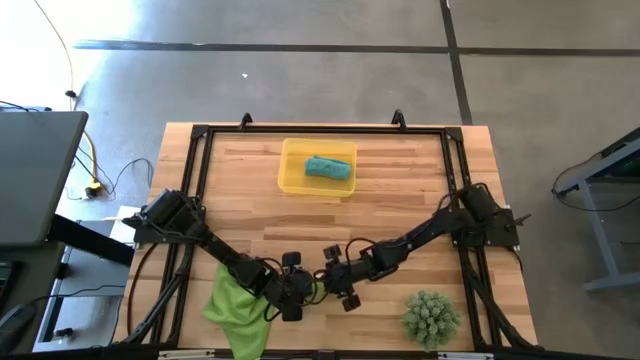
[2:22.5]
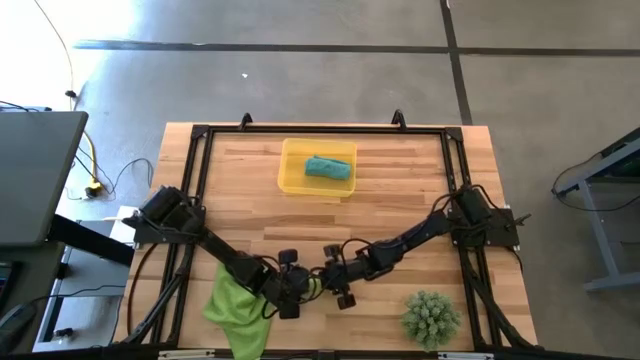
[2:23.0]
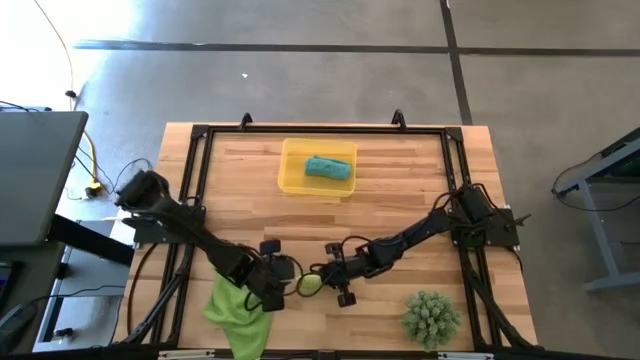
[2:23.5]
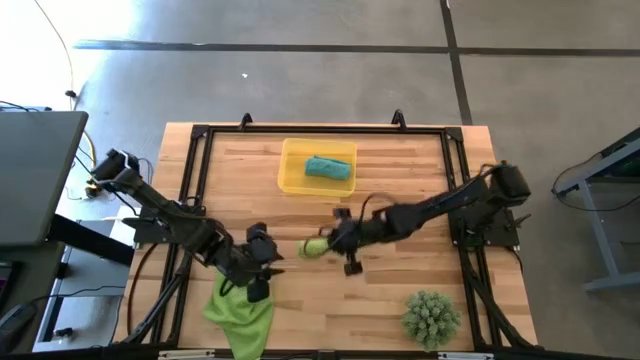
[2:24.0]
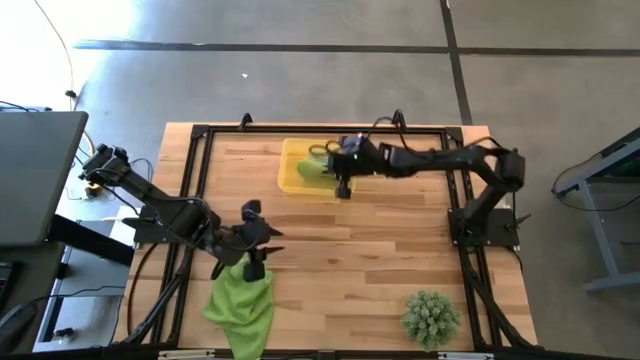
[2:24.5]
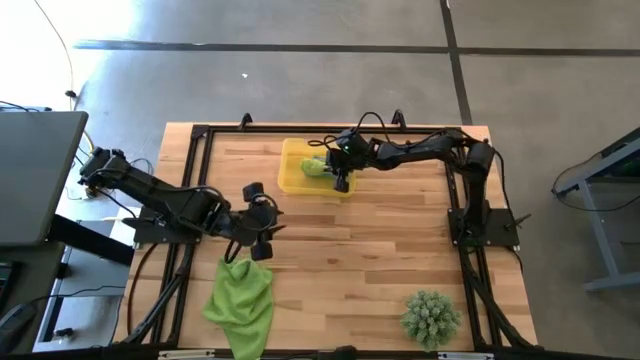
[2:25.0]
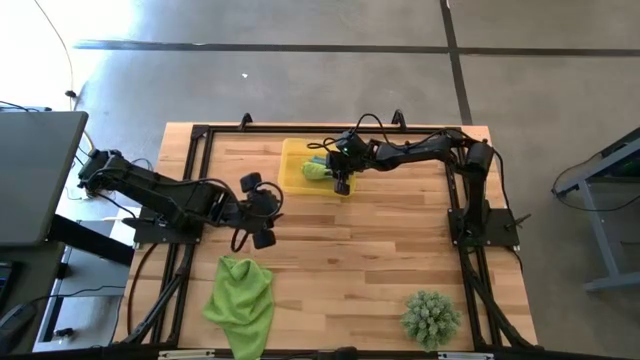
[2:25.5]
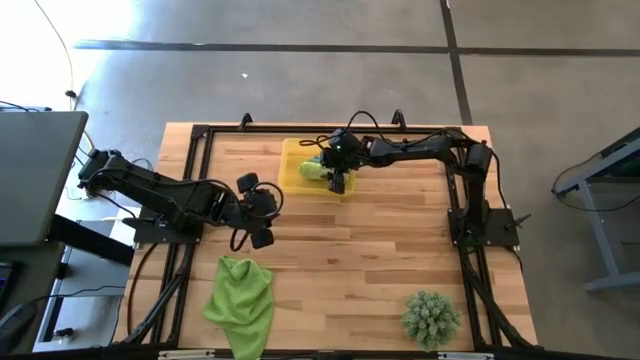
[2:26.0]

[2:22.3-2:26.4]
Task: Roll microfiber towels into tight, uniform cylinder then place into a basket
Put the rolled light green microfiber towel into the bin

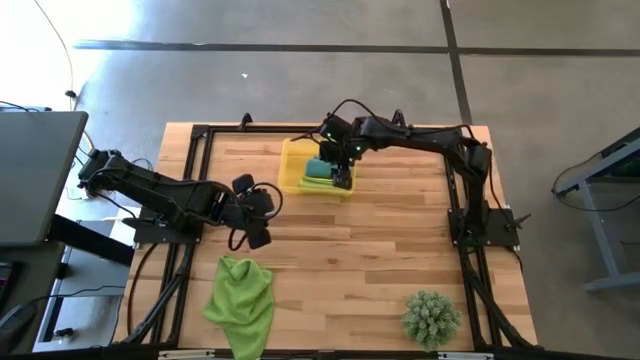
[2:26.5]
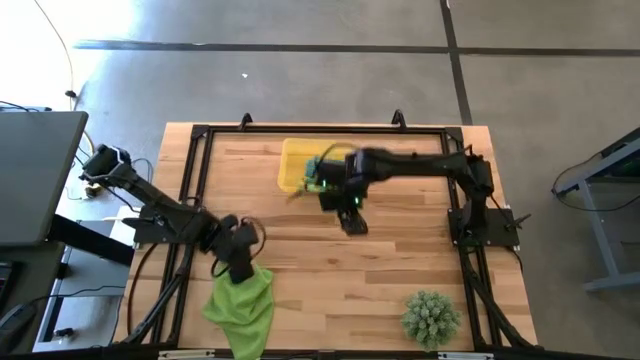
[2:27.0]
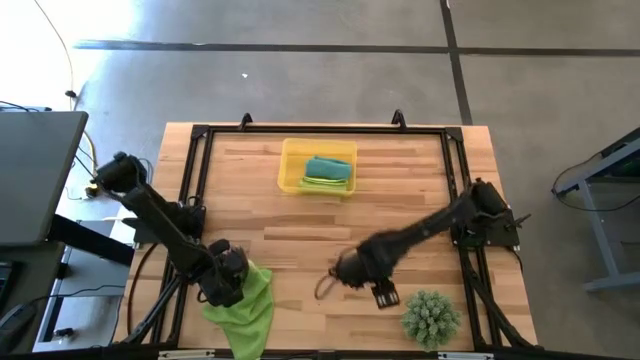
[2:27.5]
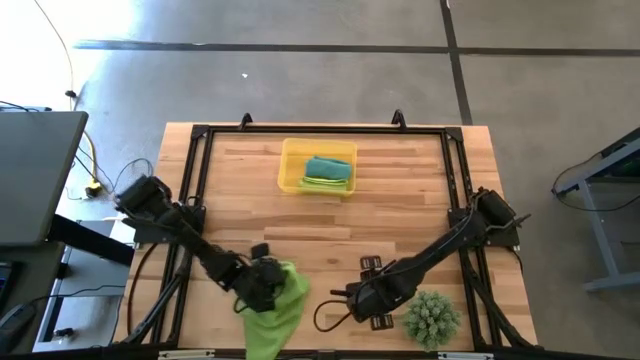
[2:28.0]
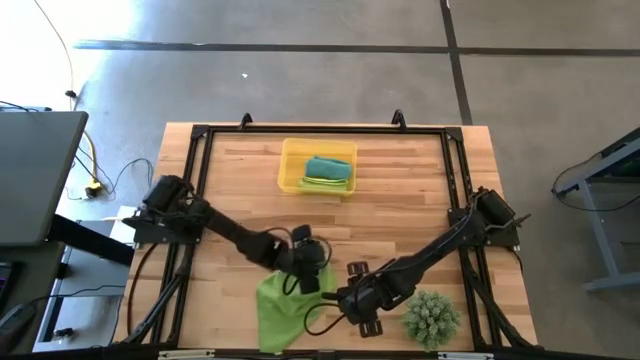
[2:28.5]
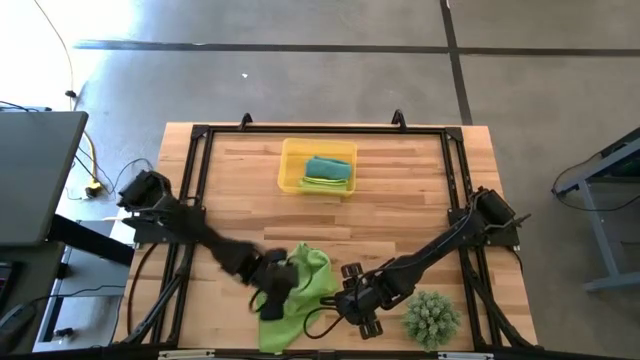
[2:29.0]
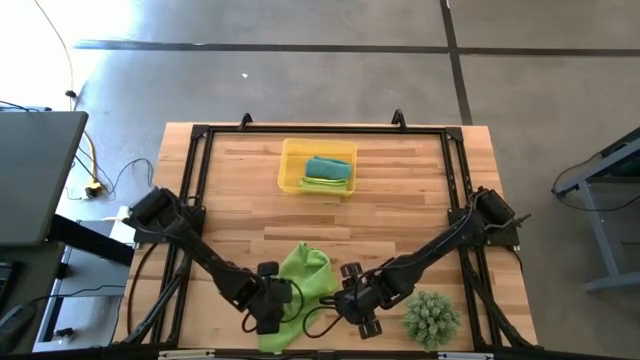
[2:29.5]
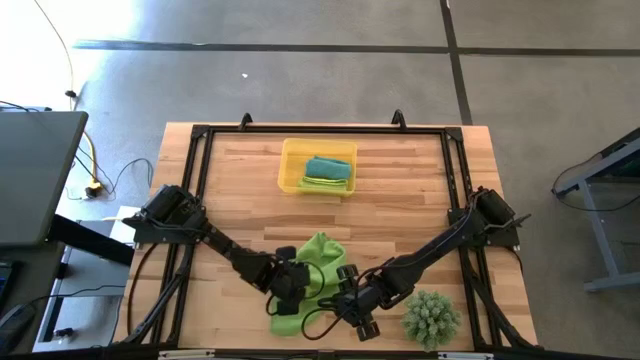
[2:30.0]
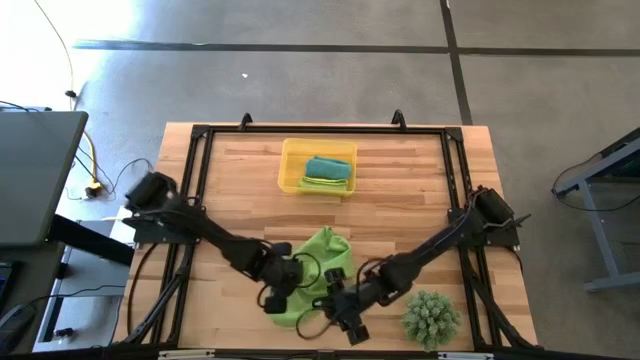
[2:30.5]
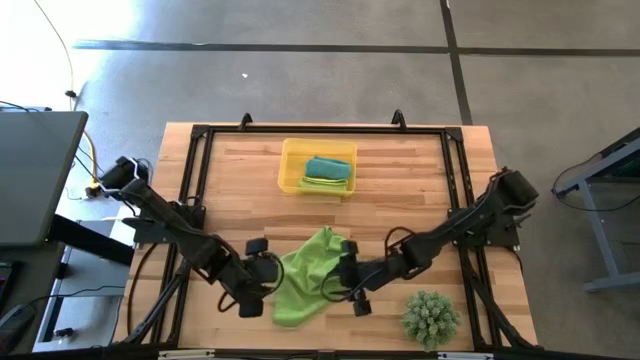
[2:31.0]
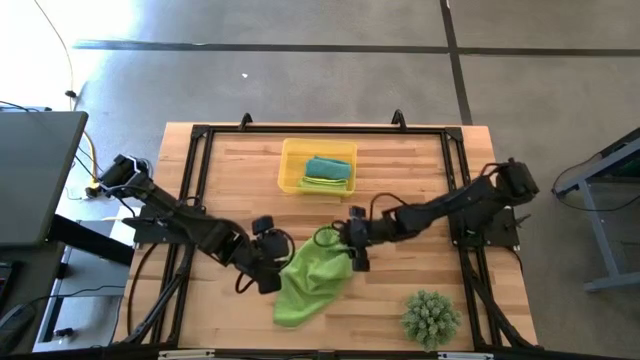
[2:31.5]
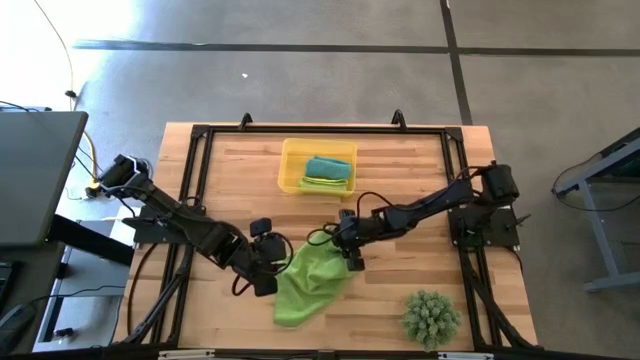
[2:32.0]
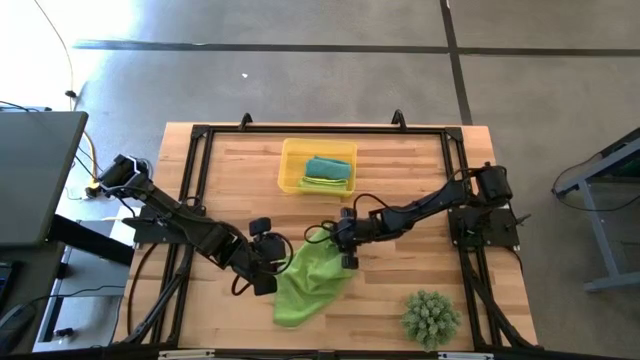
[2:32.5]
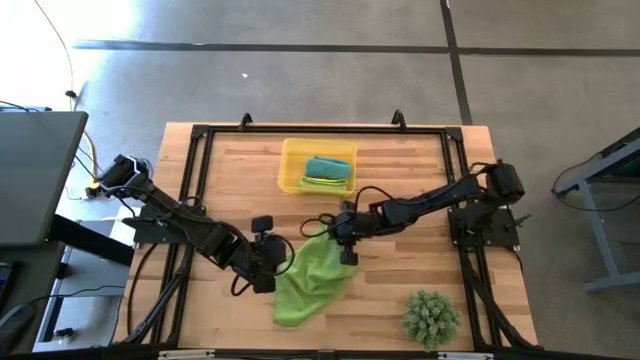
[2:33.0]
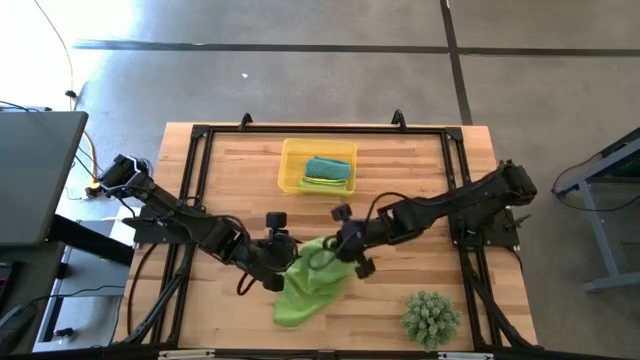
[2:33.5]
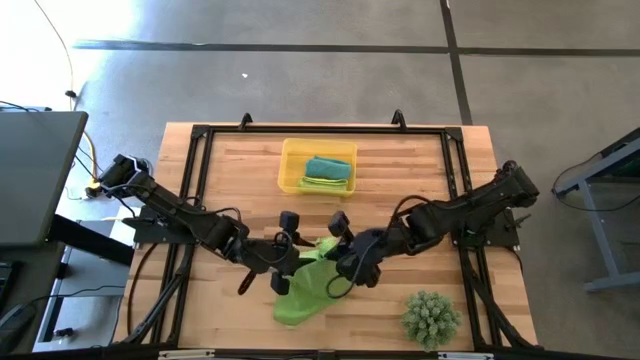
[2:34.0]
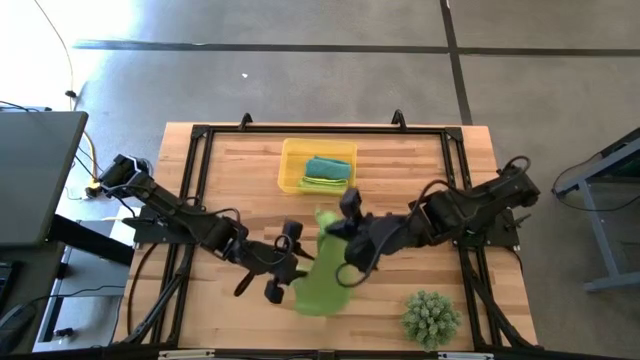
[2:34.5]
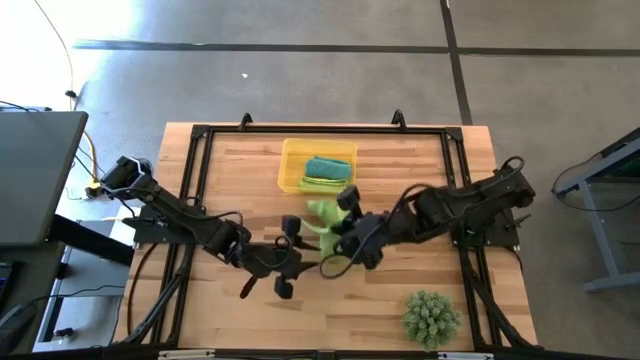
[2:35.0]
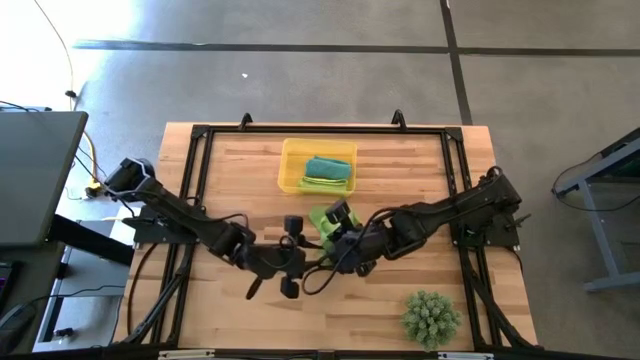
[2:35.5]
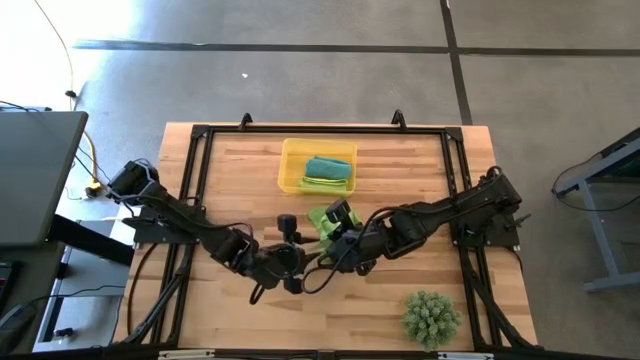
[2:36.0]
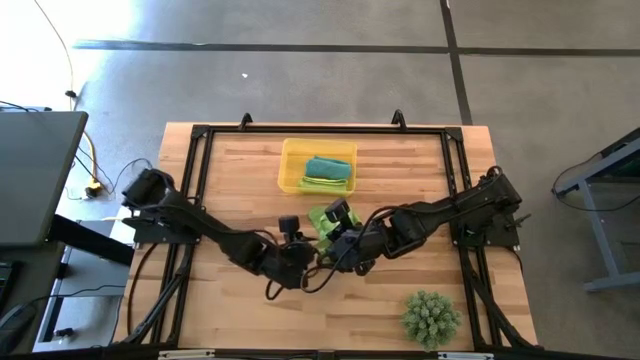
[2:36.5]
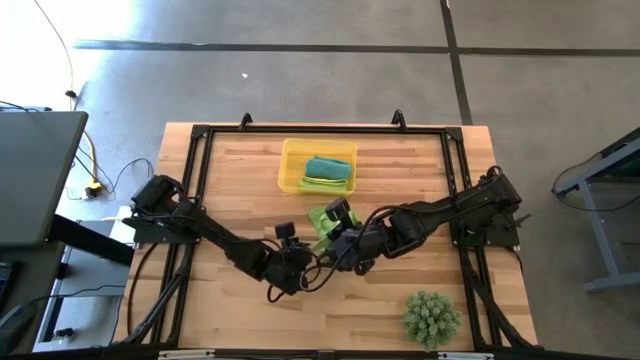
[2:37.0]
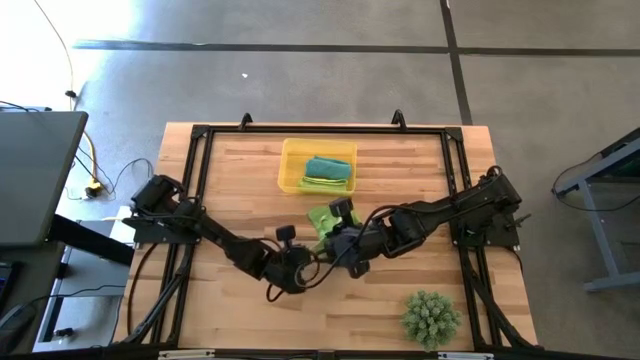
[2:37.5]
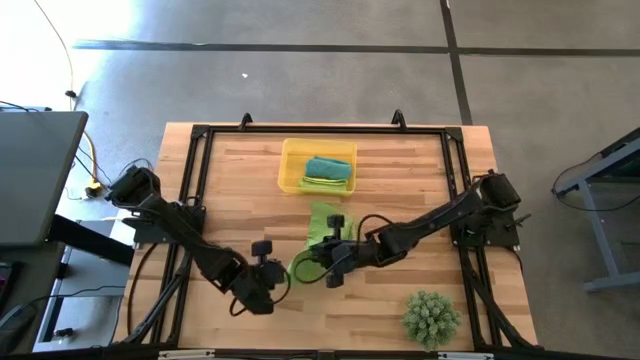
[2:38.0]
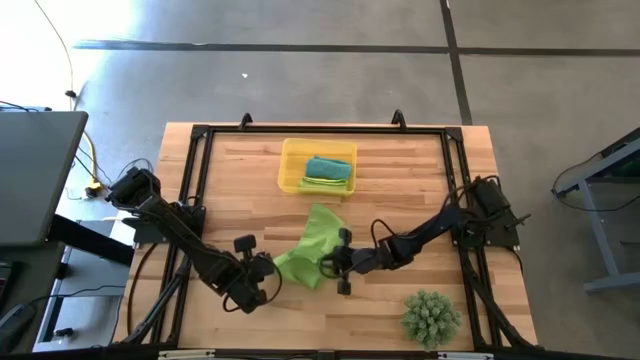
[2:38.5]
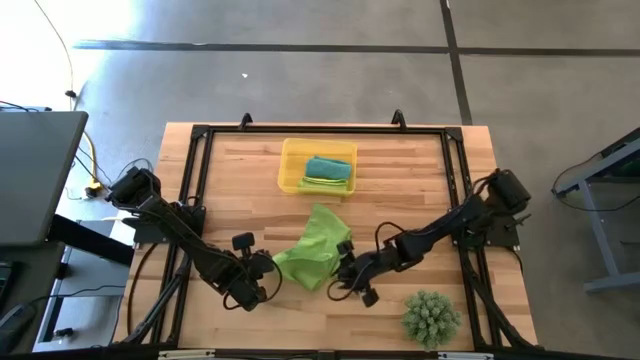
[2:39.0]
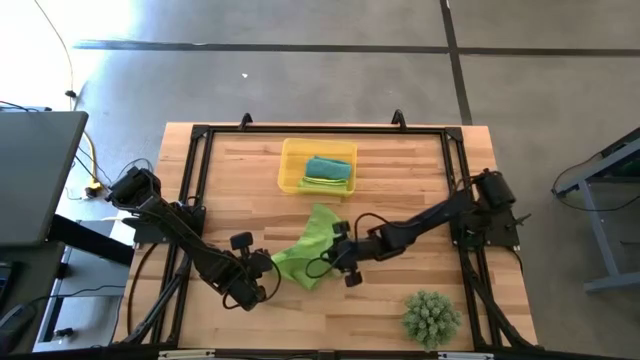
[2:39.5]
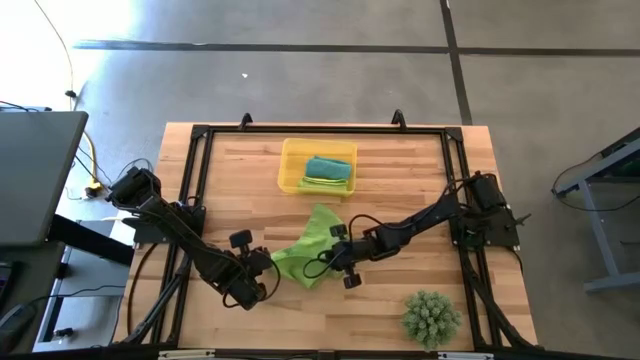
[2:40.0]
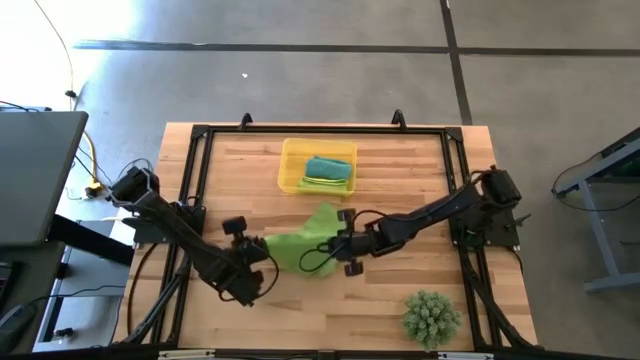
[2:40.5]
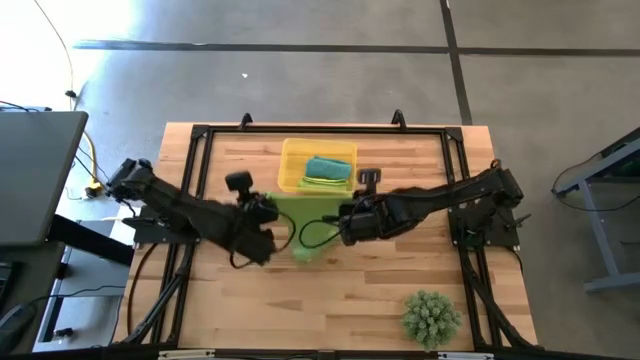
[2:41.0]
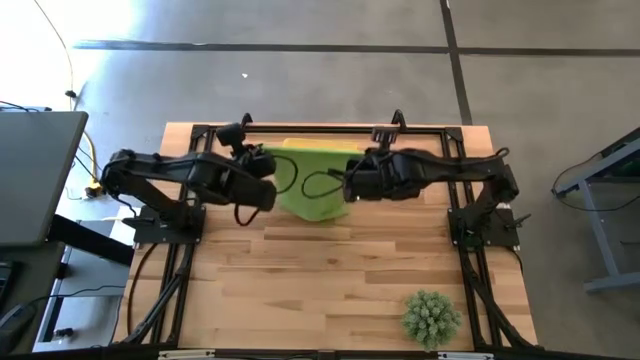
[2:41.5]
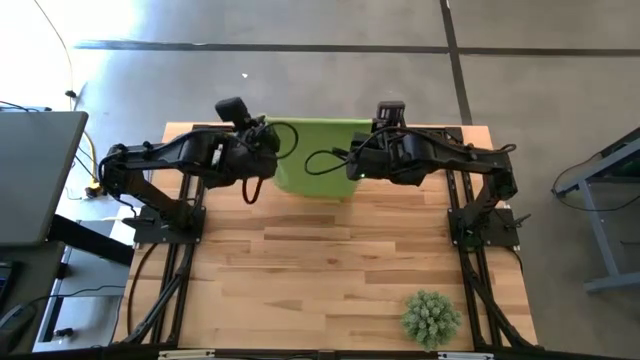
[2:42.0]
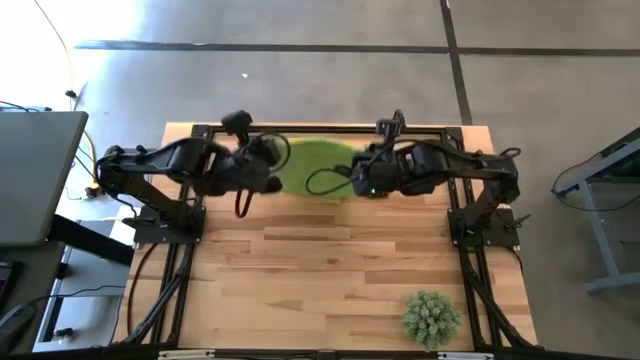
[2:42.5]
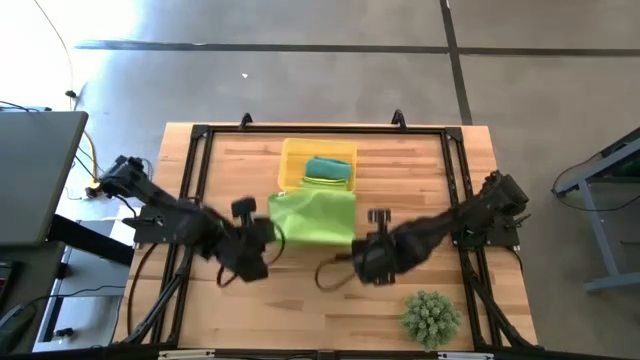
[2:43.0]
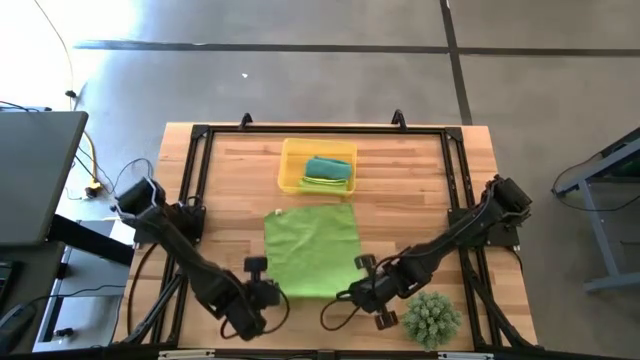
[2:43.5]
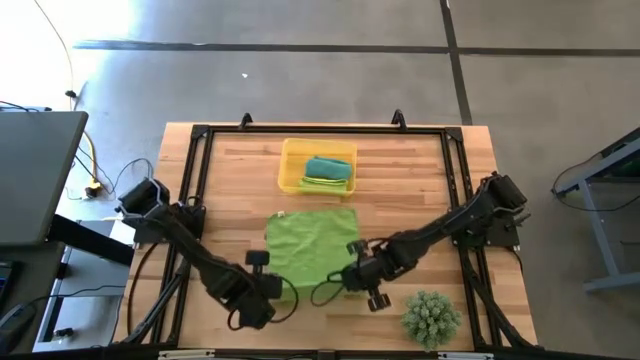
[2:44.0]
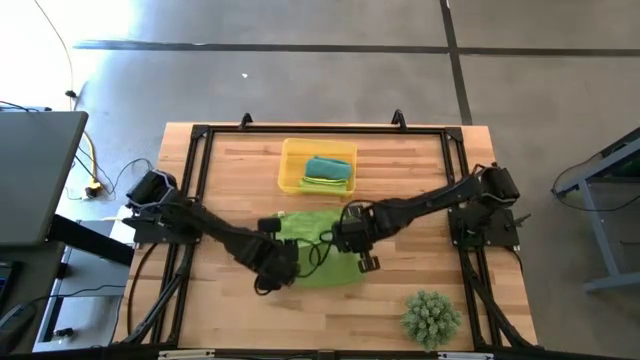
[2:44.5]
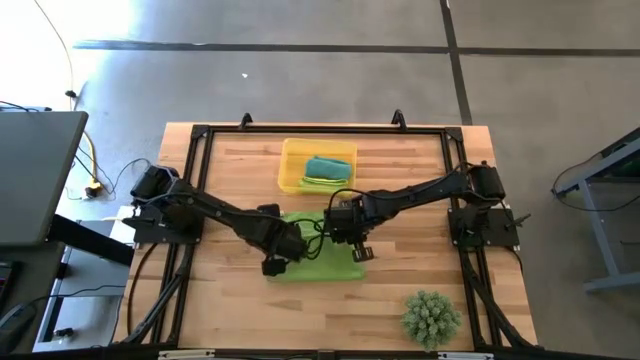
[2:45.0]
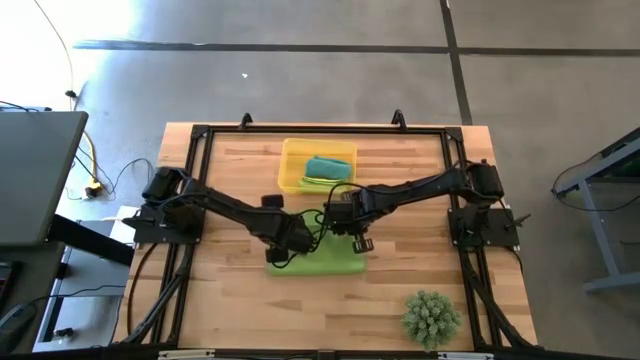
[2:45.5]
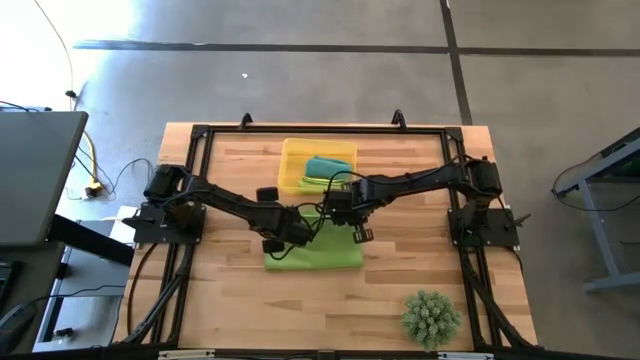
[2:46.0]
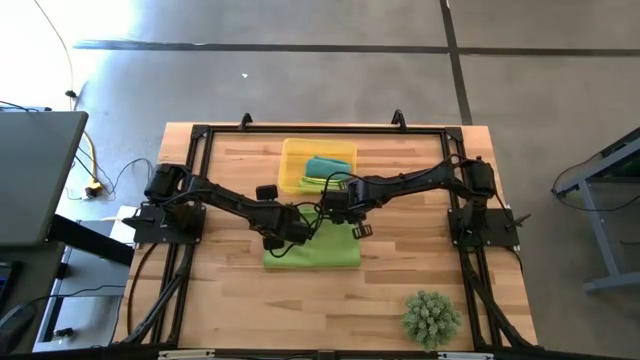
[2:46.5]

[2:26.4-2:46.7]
Roll the green microfiber towel
